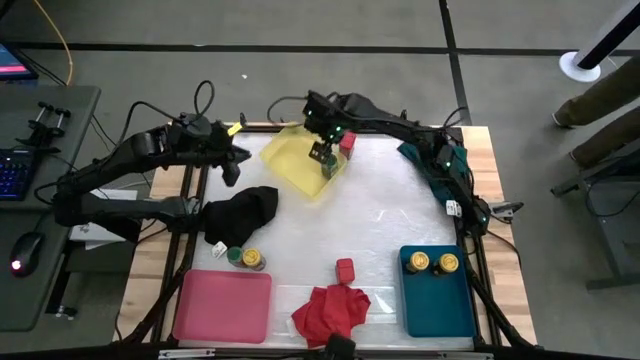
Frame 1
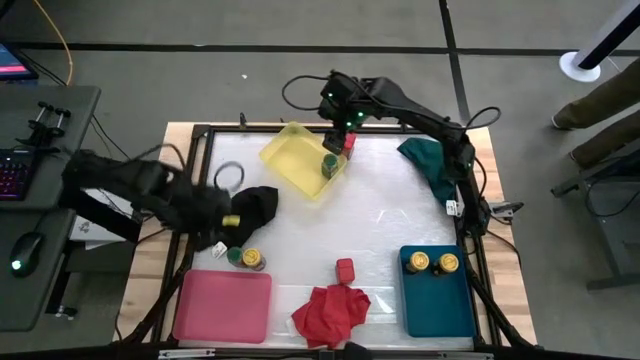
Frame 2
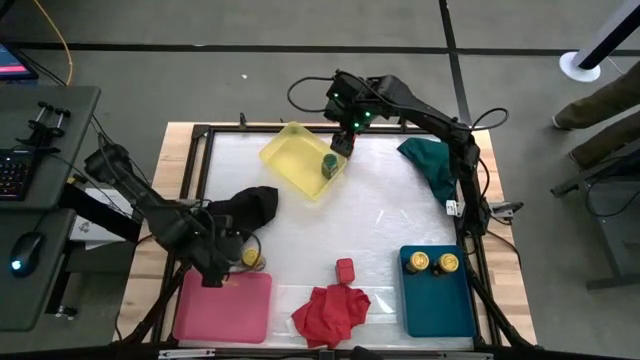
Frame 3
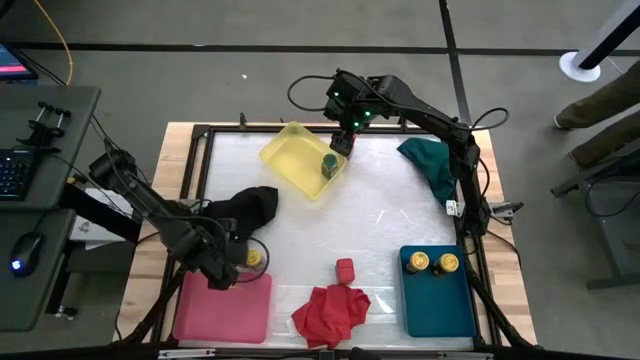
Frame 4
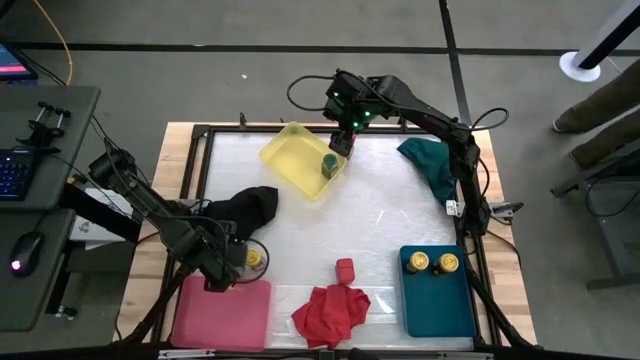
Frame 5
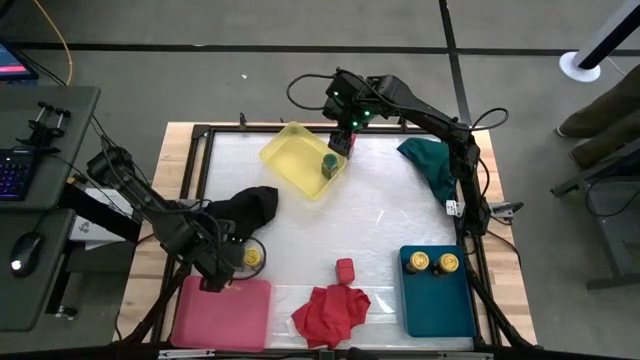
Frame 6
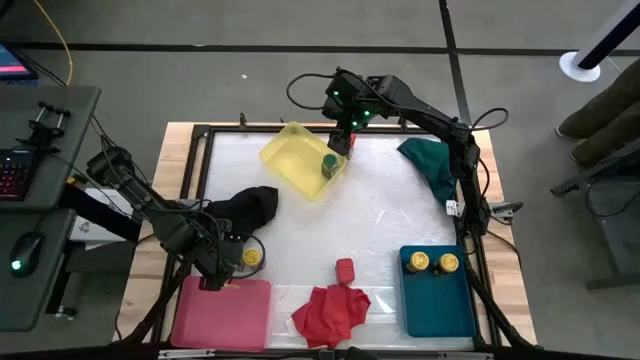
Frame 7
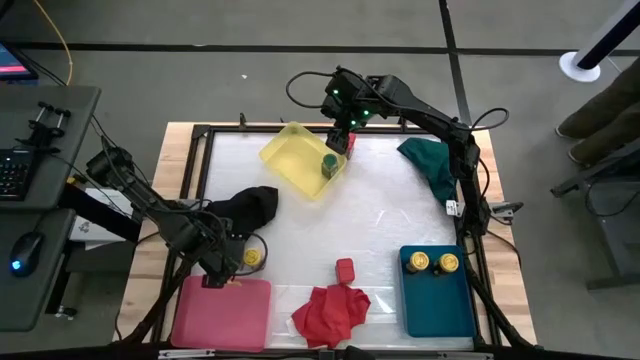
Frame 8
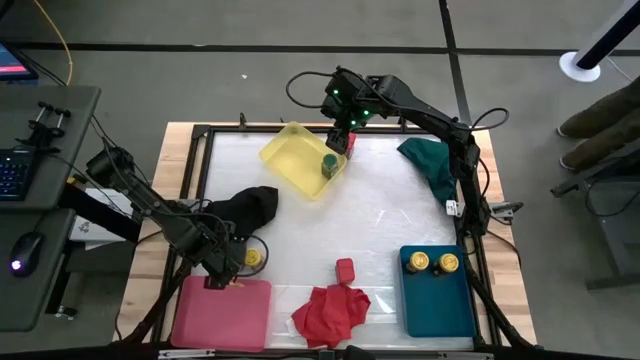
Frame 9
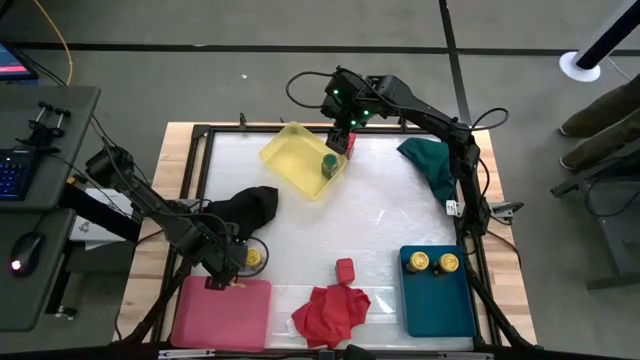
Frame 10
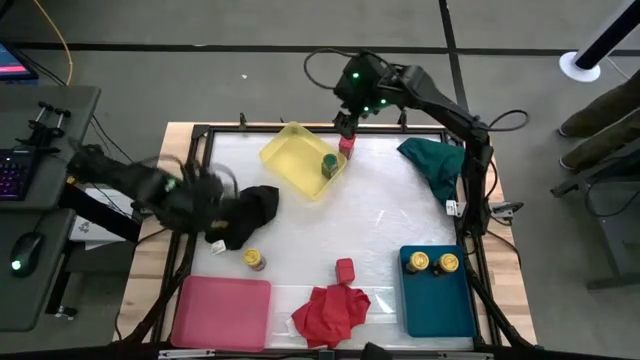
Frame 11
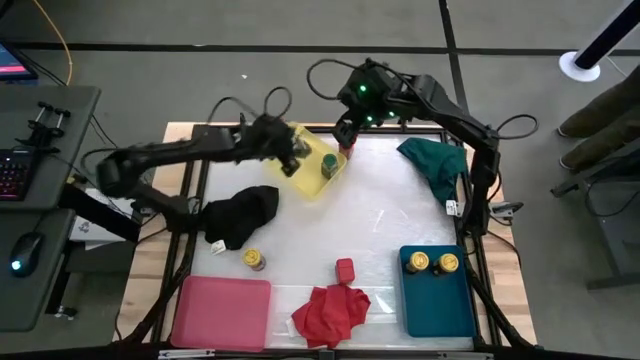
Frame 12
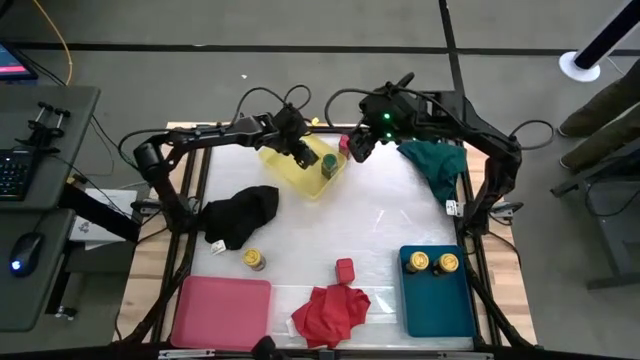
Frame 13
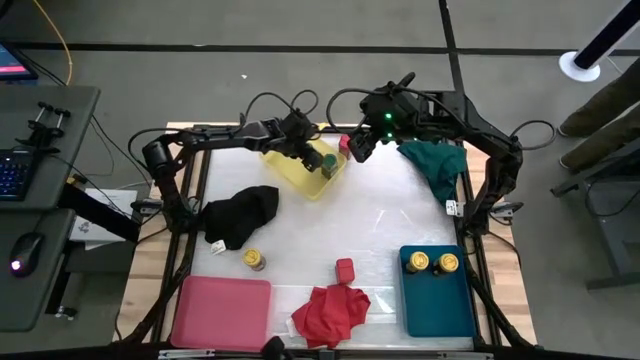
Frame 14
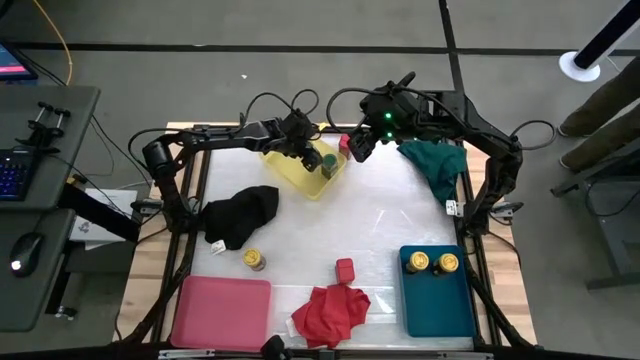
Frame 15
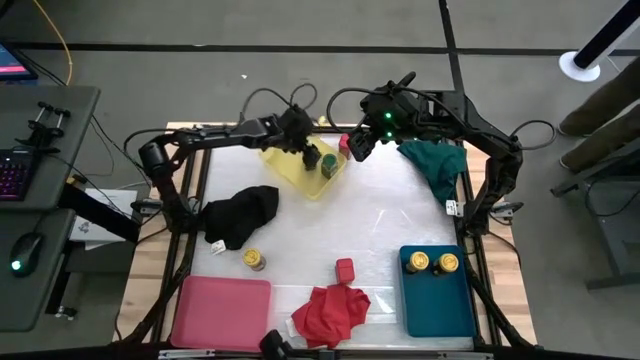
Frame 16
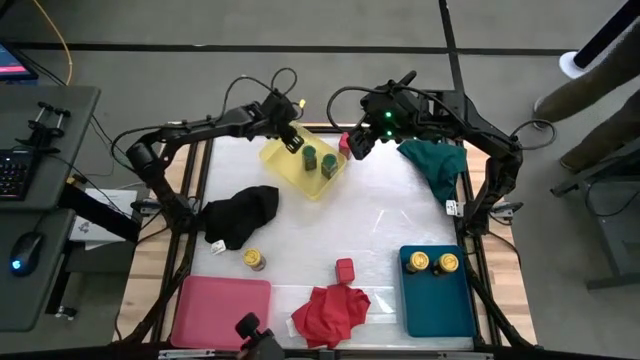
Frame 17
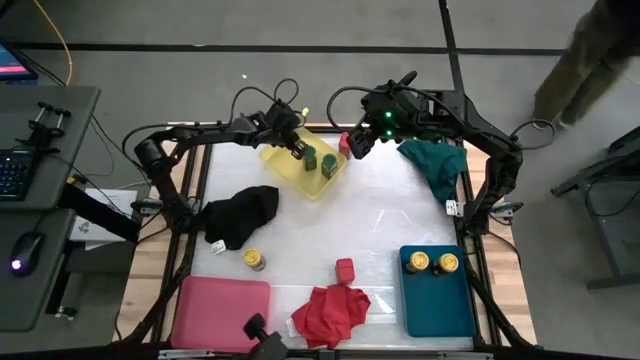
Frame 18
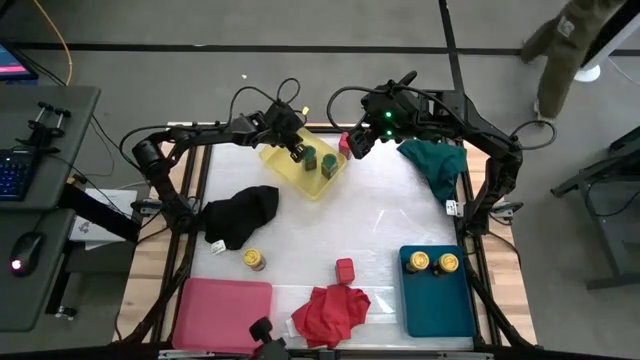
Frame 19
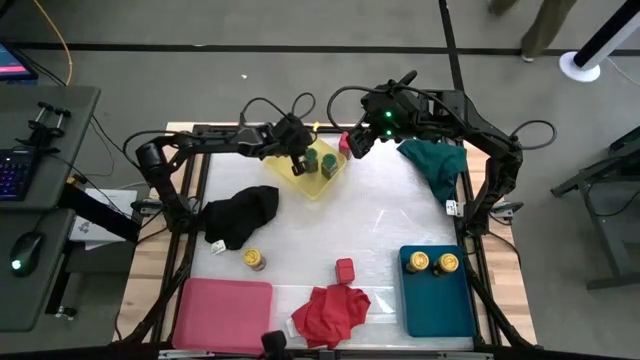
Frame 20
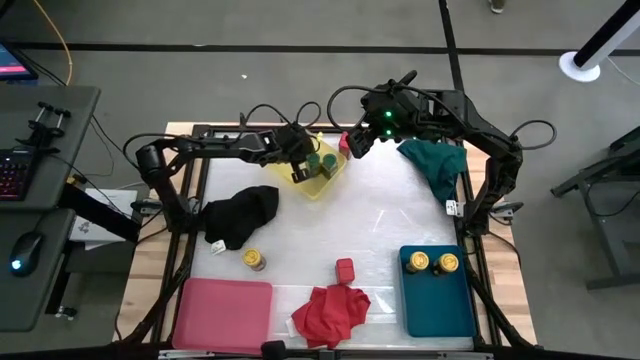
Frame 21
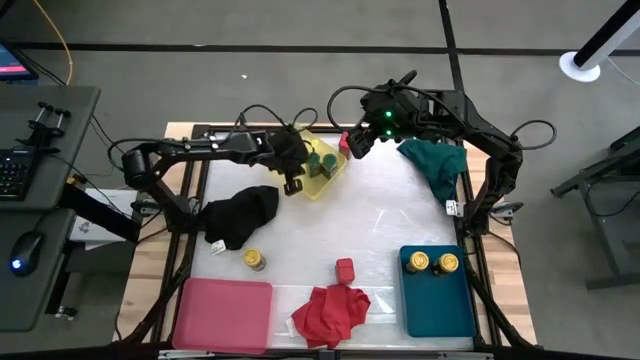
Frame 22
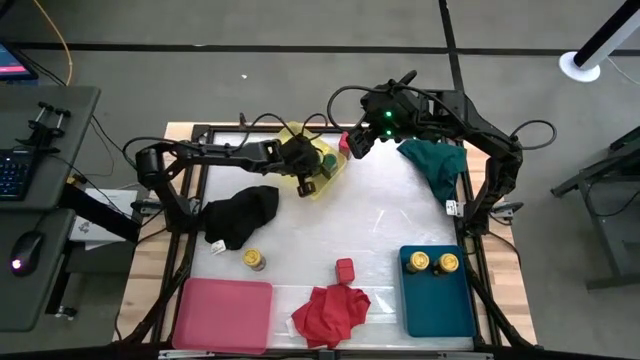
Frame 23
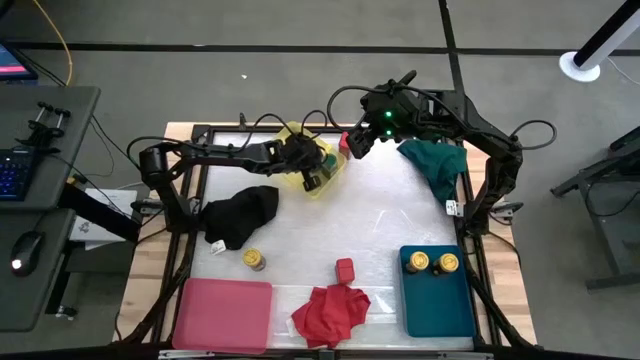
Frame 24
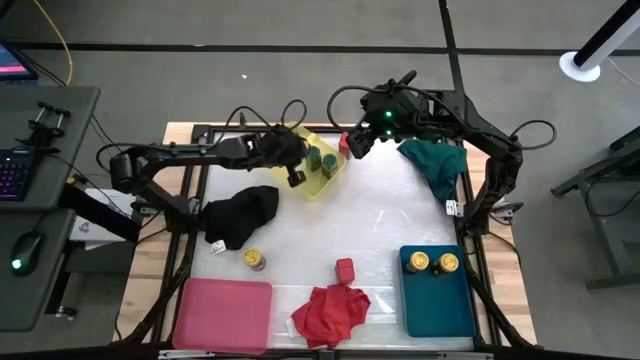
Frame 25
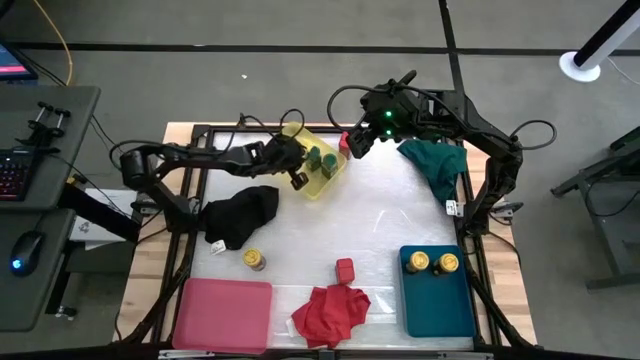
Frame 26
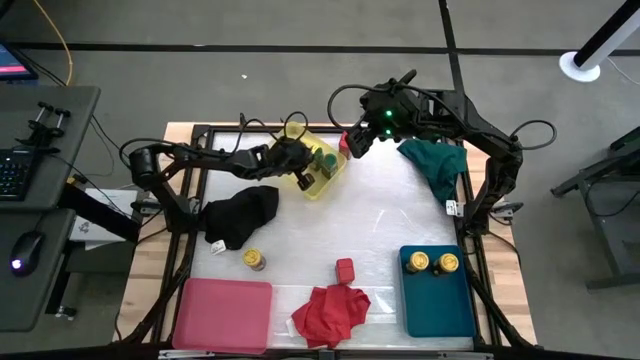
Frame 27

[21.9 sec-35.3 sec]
Task: Sort spices by type
Put the green seasoning bottle into the yellow bin

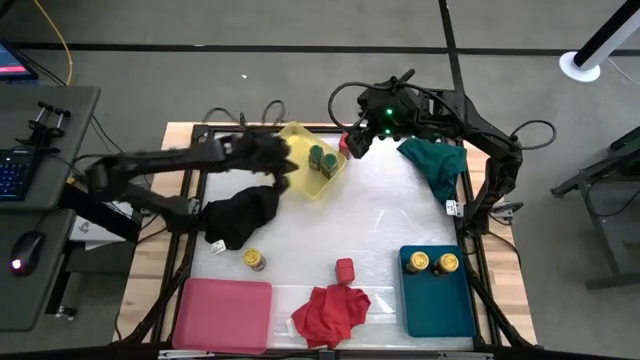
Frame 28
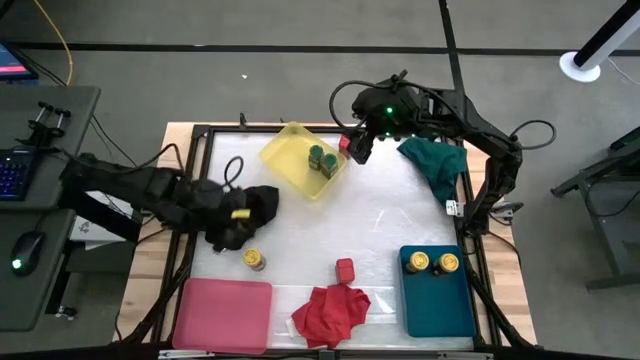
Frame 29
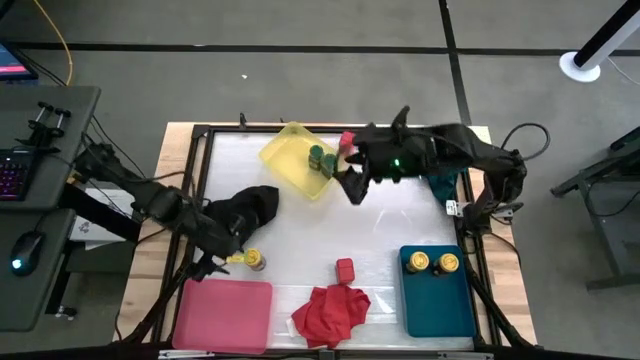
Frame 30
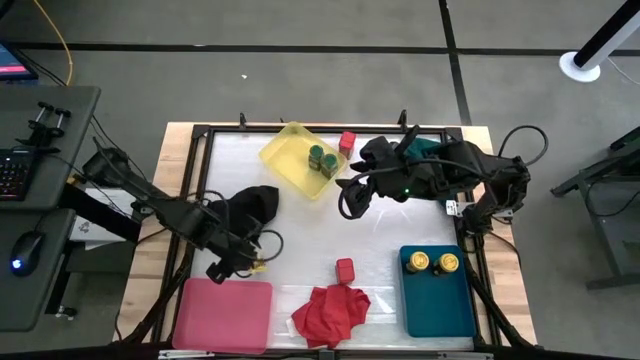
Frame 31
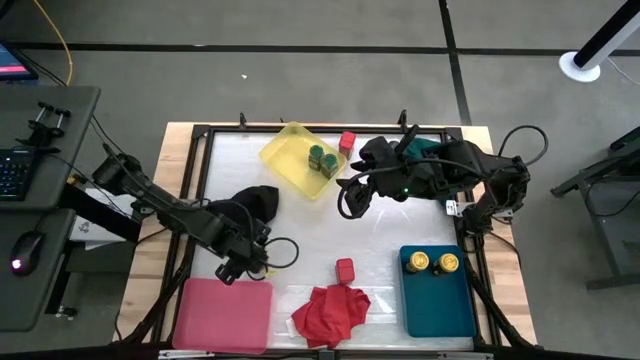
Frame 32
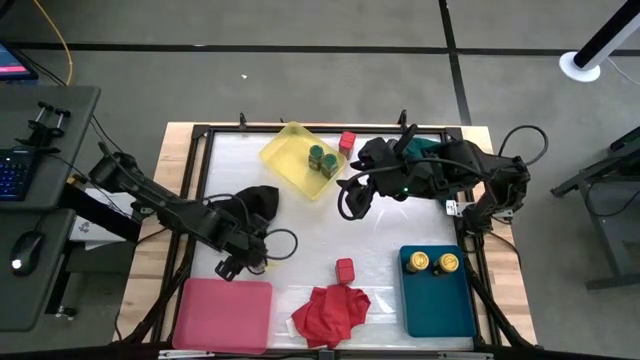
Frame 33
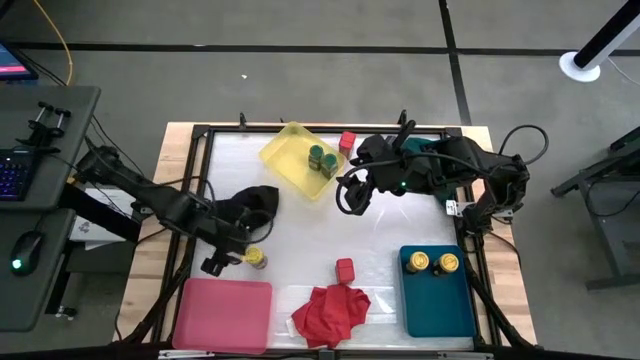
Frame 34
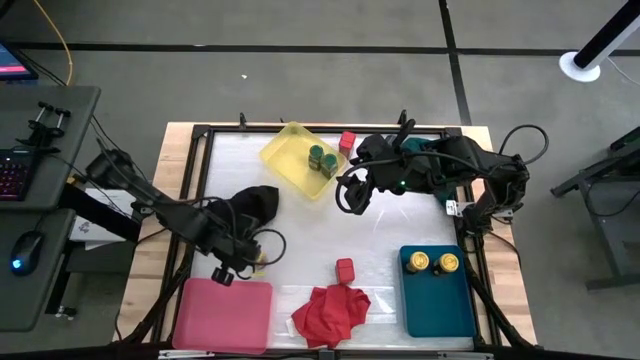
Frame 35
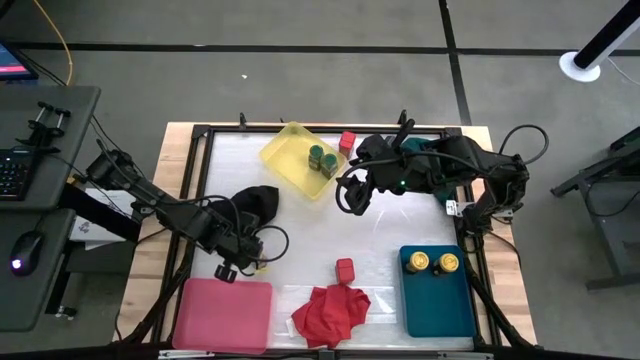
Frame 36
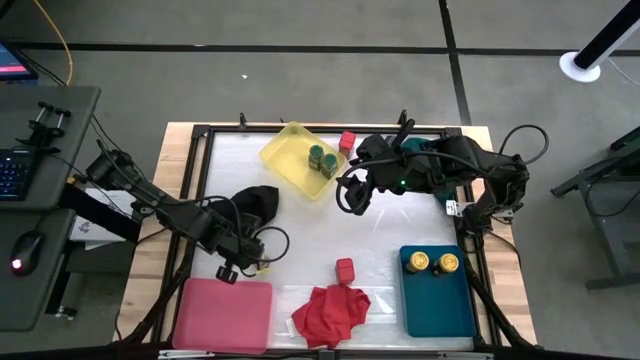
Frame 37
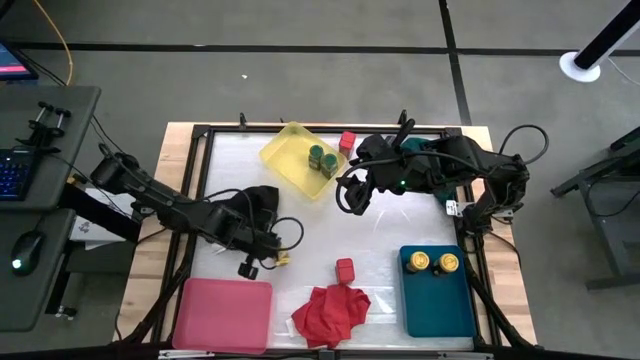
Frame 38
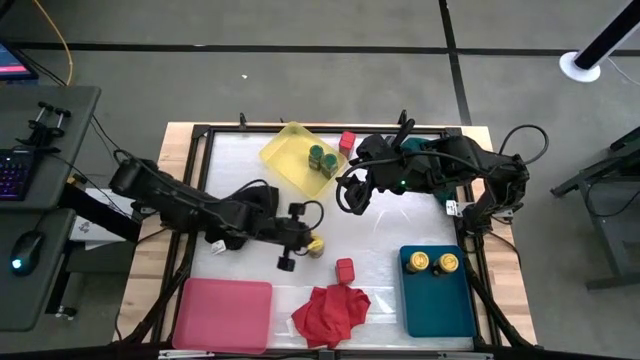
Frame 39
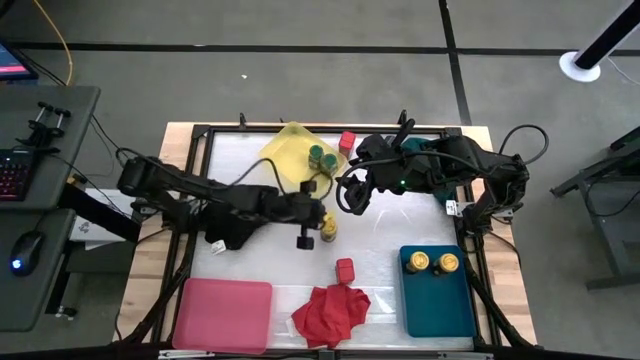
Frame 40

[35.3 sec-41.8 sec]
Move the yellow seasoning bottle to the center of the table

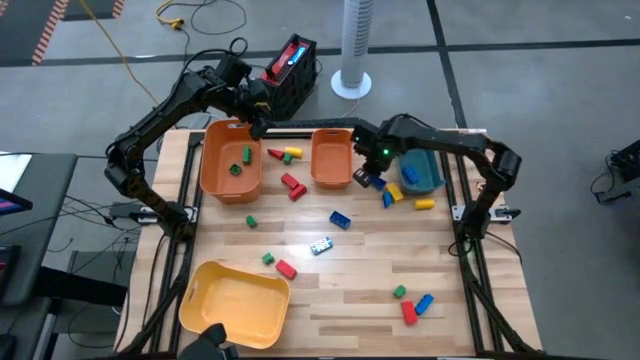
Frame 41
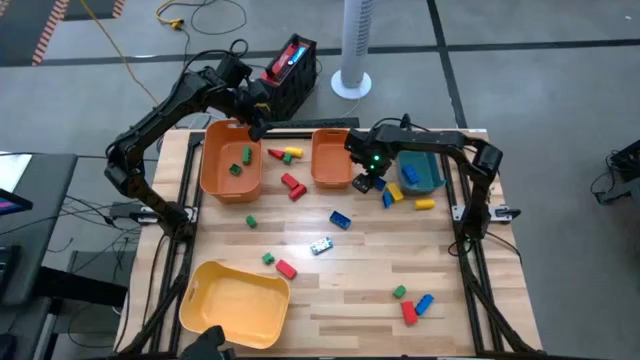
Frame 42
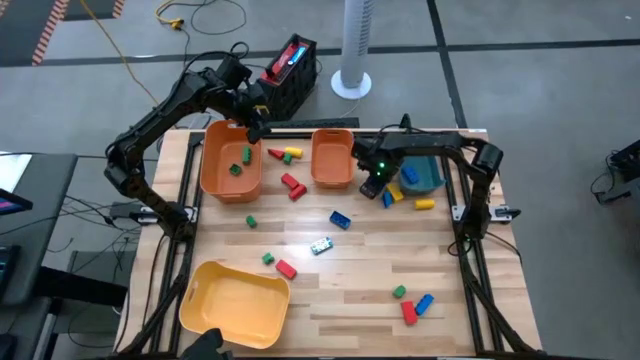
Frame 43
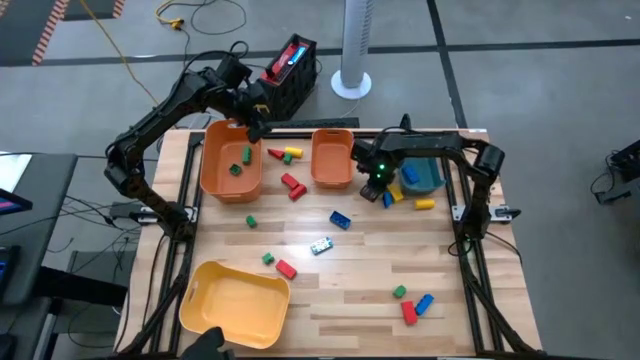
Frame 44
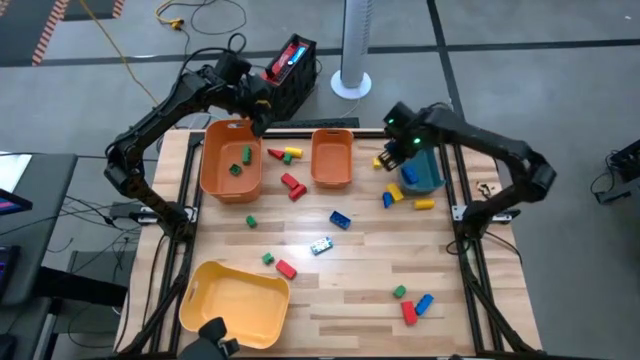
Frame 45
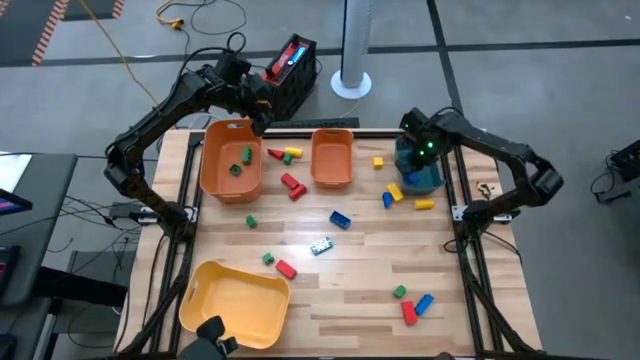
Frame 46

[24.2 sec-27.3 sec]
Task: Sort blocks
Put the blue game piece into the green bin
